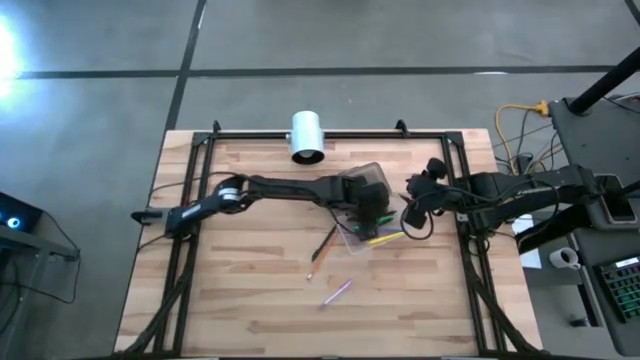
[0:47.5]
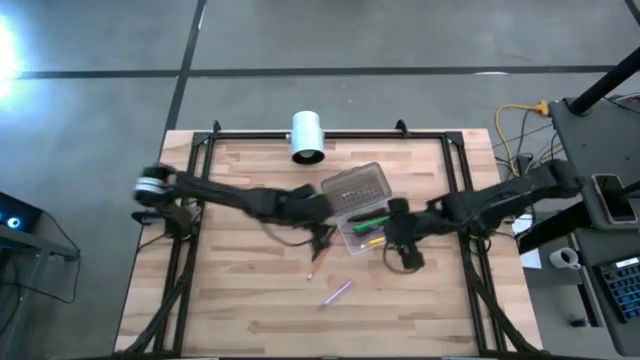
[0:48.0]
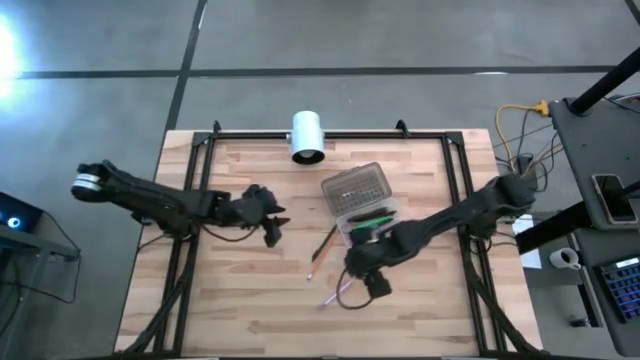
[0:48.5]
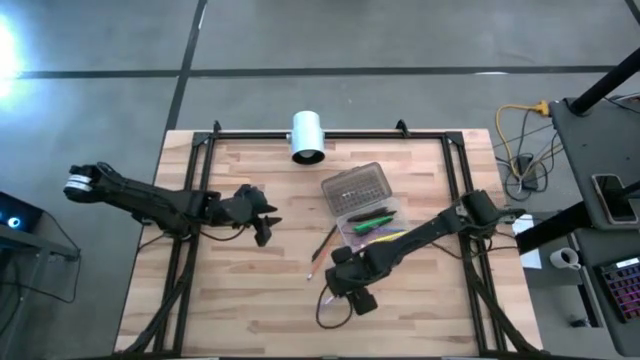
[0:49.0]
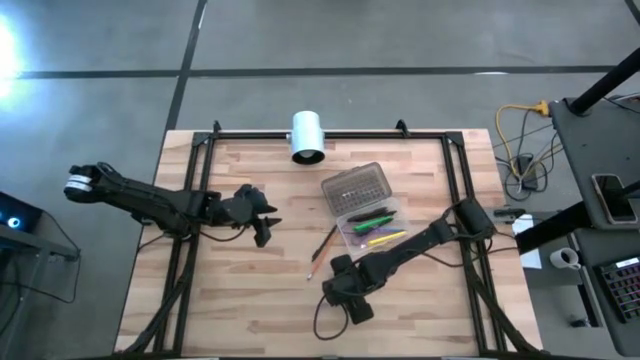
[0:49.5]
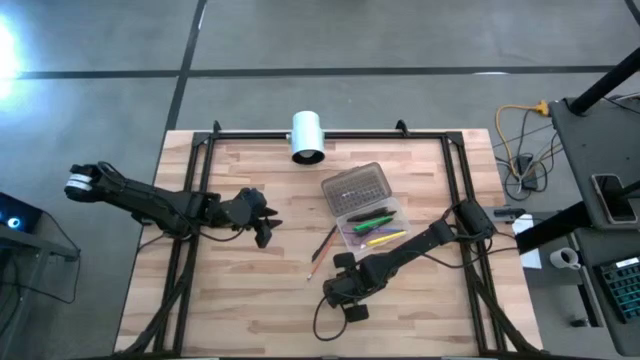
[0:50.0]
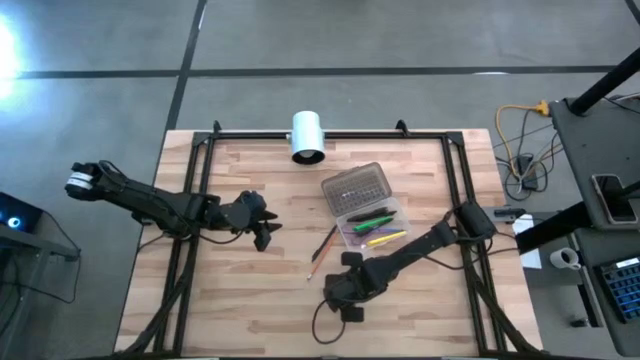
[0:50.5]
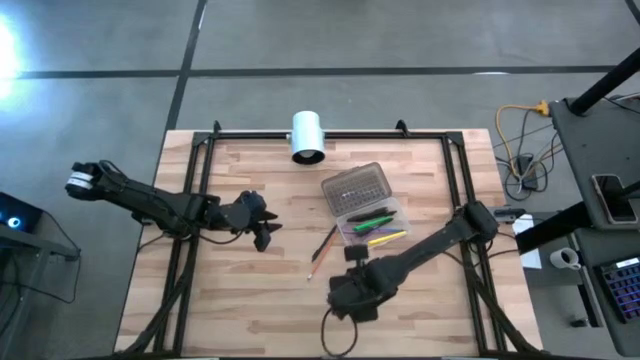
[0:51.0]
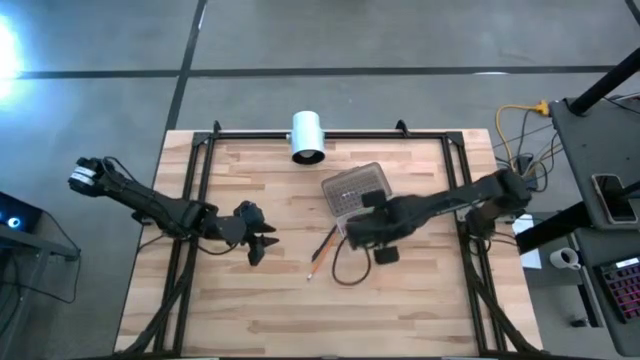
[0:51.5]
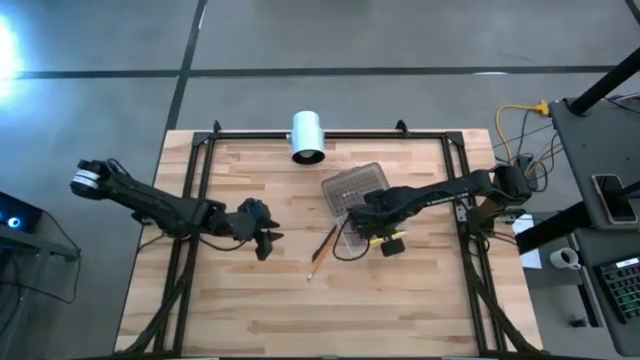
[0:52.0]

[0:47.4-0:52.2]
Task: Pick & place school supplies into a supply box
Put the purple pen into the supply box

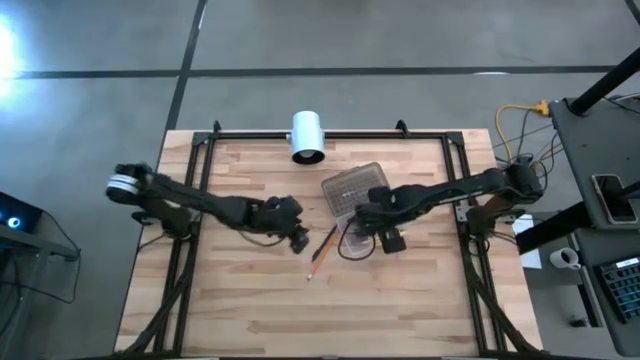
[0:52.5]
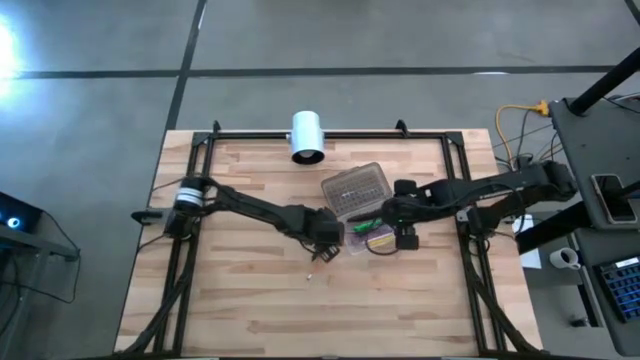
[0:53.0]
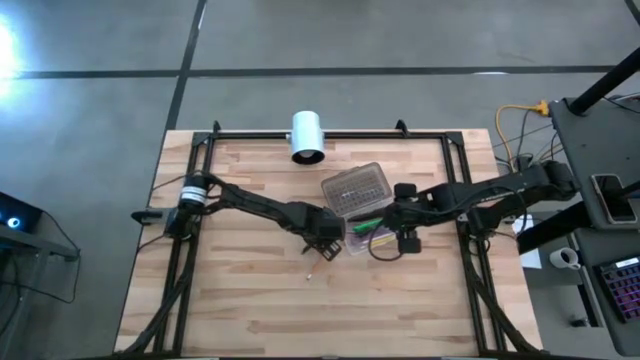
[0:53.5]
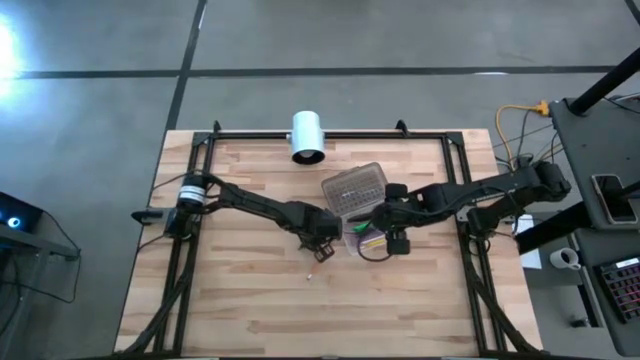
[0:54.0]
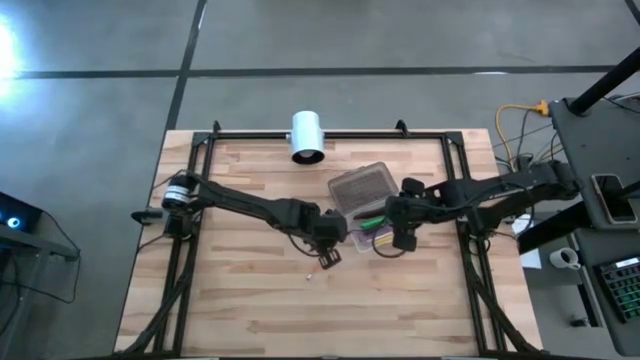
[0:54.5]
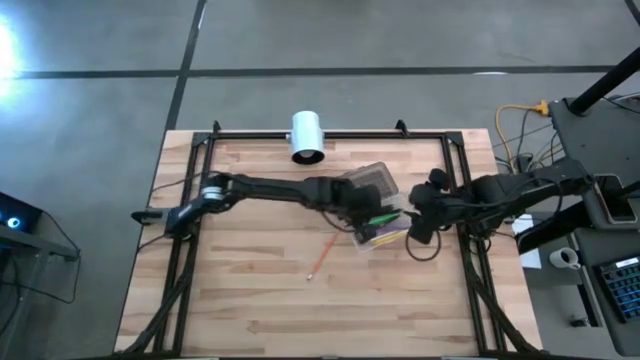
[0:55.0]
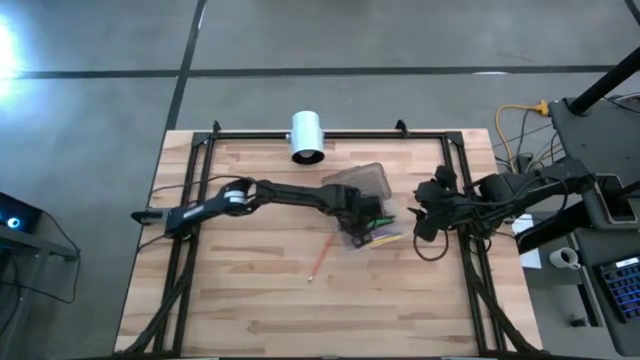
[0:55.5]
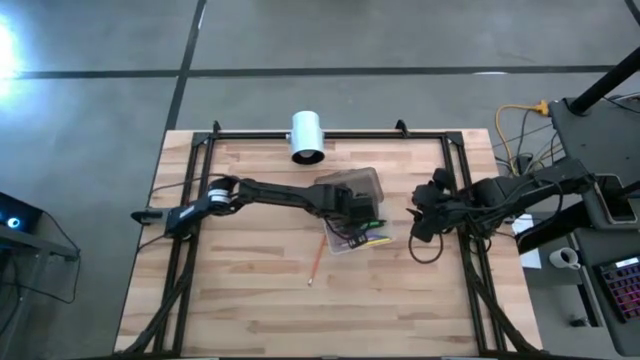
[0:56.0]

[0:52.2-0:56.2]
Put the black pen into the supply box

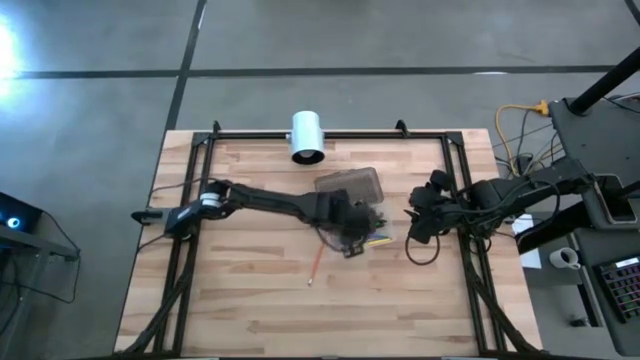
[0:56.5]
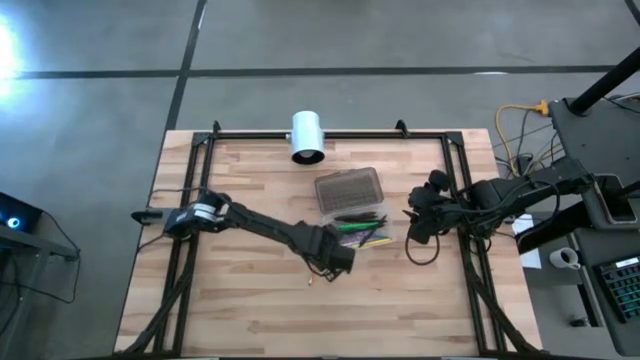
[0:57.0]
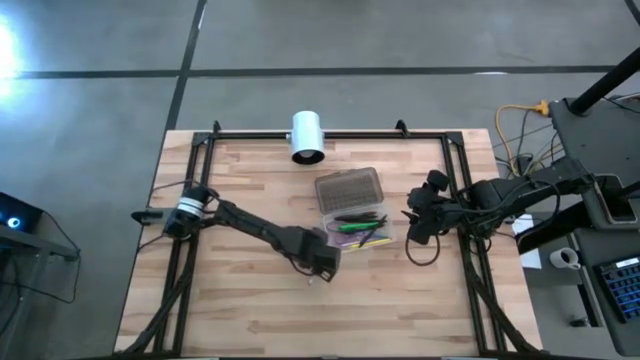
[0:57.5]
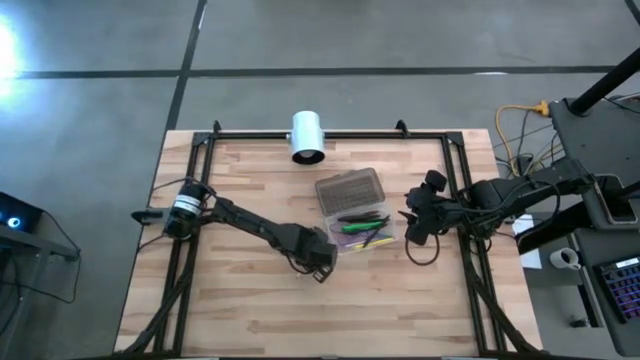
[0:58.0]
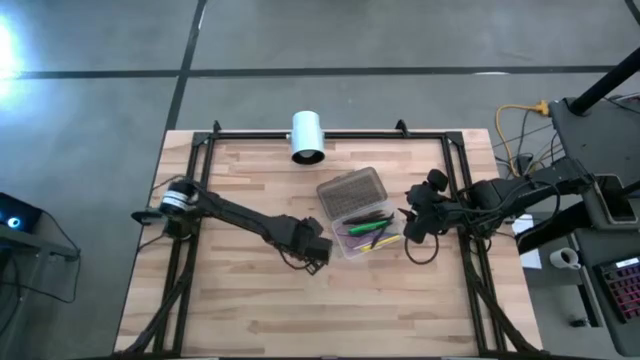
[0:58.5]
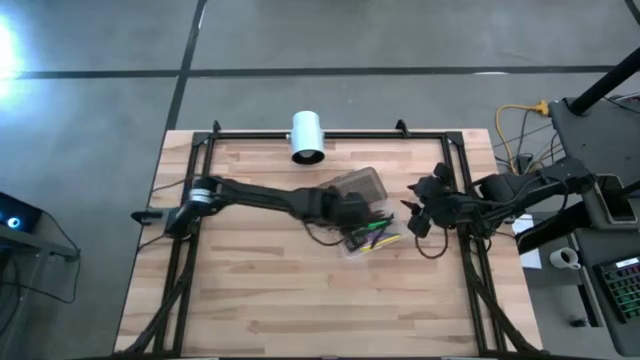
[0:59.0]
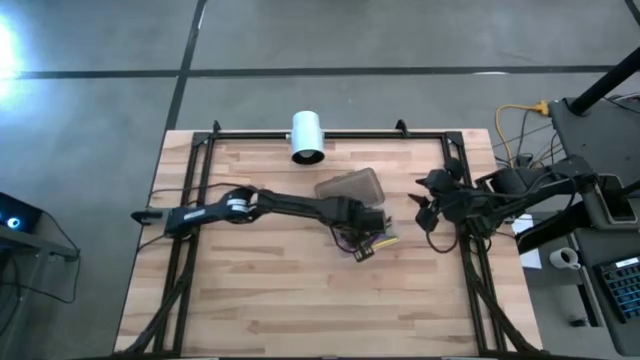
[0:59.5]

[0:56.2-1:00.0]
Put the yellow pencil into the supply box

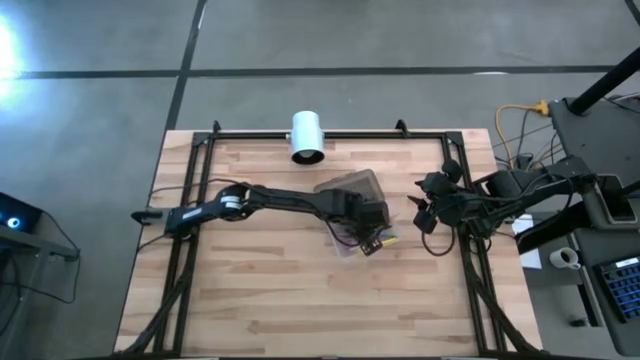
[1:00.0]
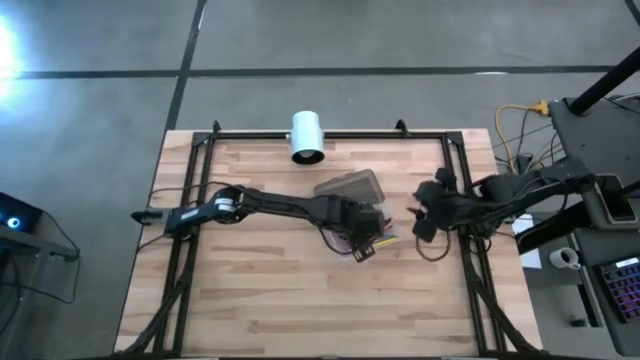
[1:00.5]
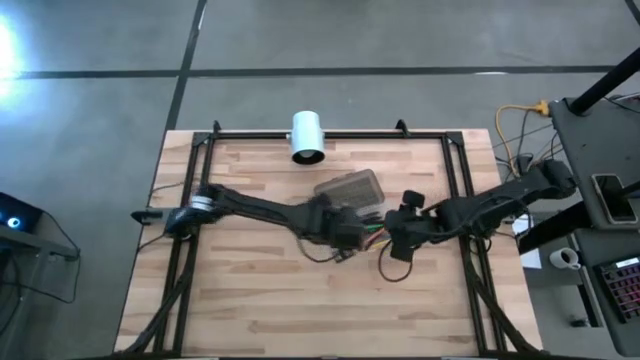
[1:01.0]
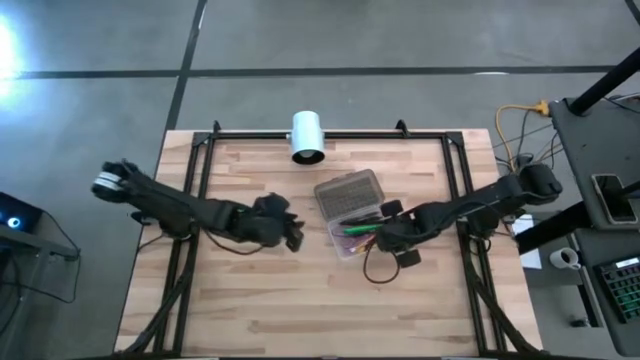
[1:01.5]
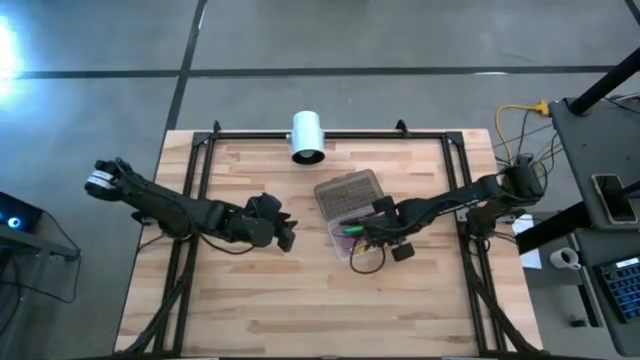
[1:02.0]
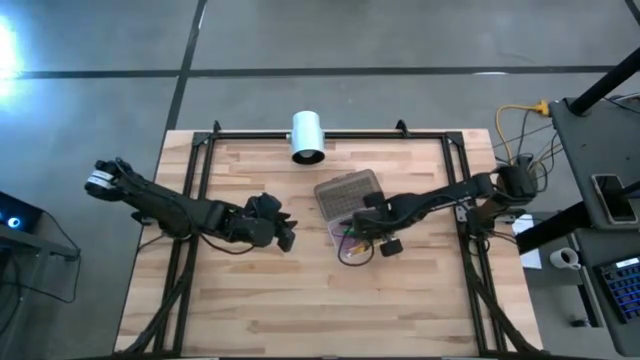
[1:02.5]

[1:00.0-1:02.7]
Adjust the yellow pencil in the supply box

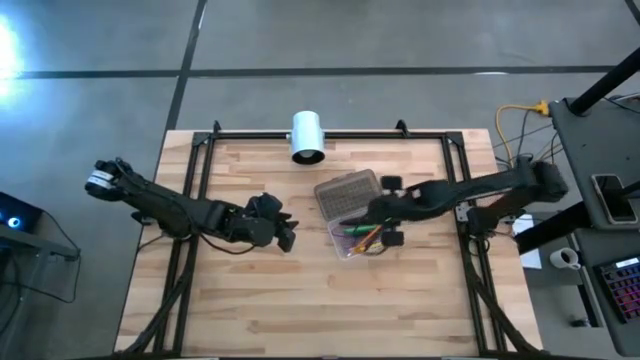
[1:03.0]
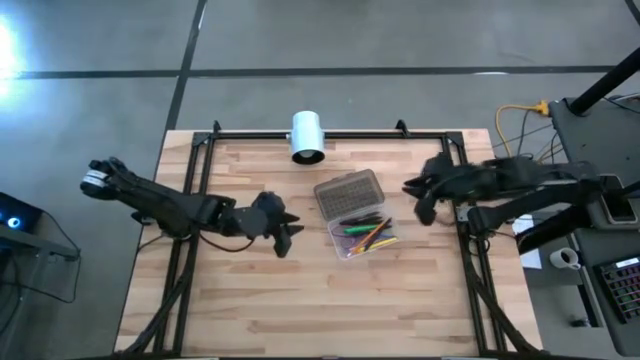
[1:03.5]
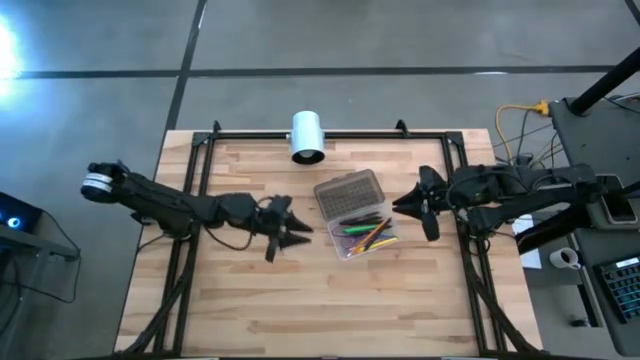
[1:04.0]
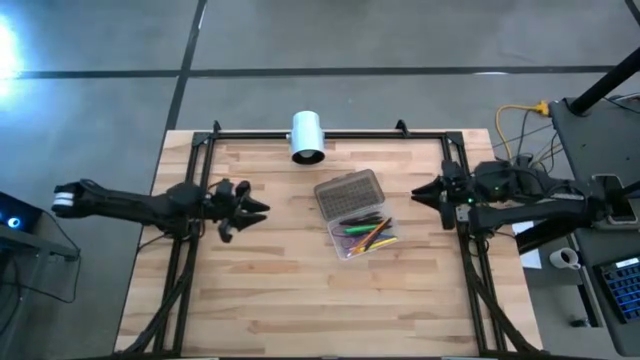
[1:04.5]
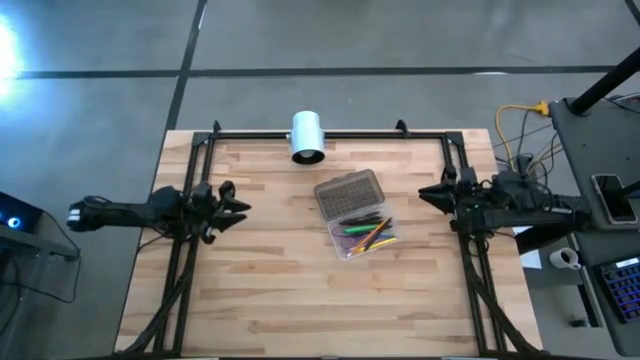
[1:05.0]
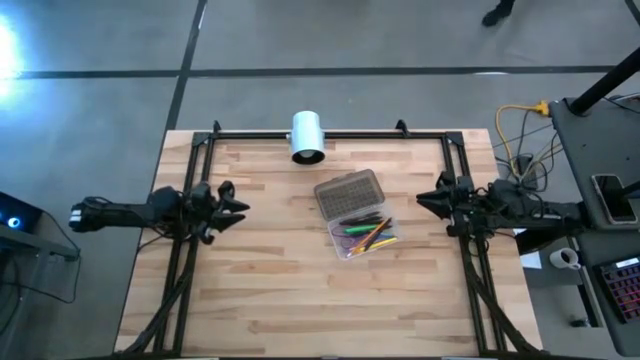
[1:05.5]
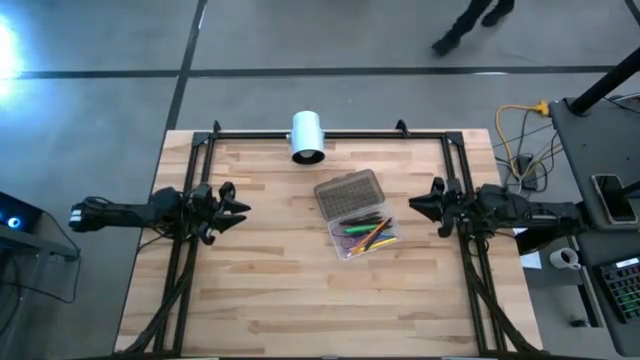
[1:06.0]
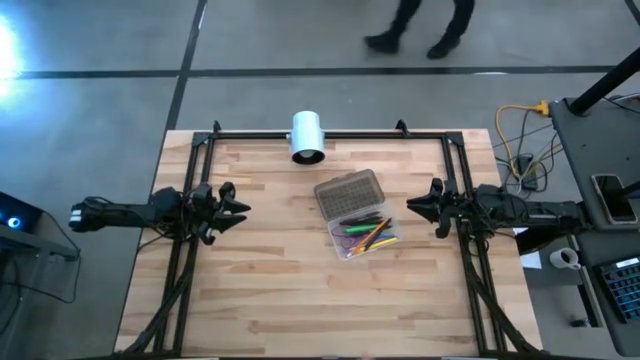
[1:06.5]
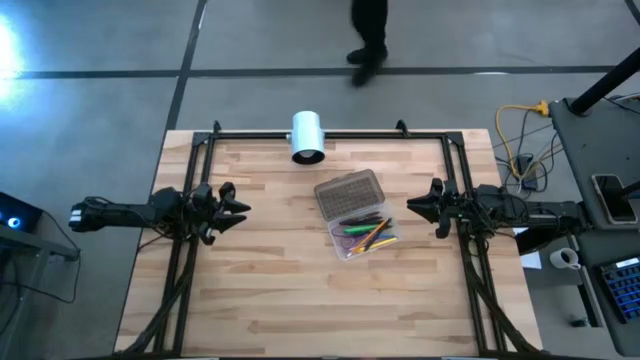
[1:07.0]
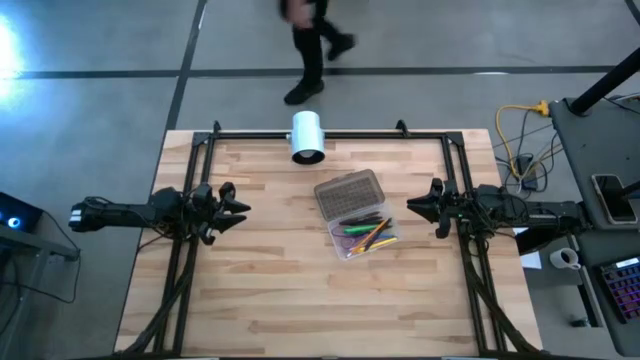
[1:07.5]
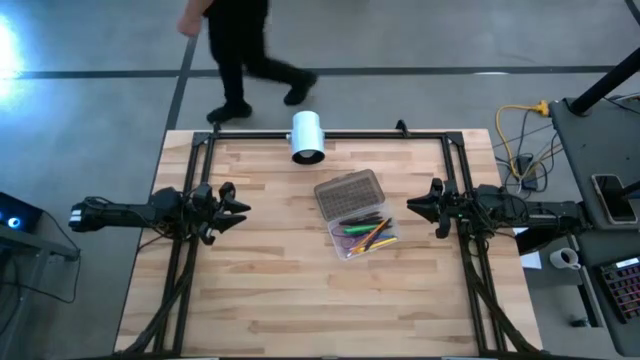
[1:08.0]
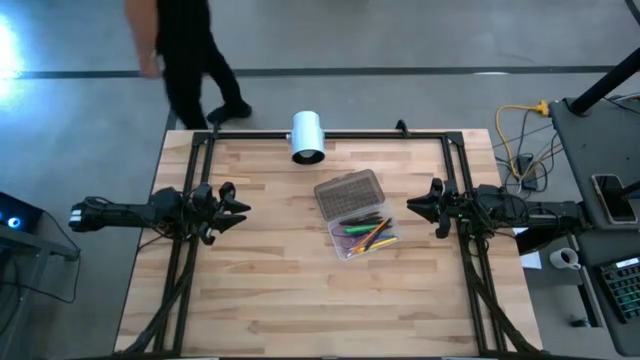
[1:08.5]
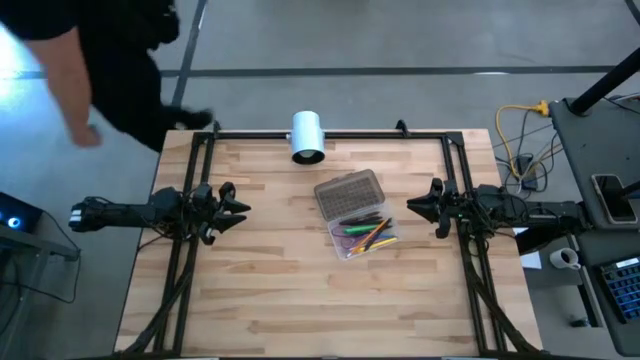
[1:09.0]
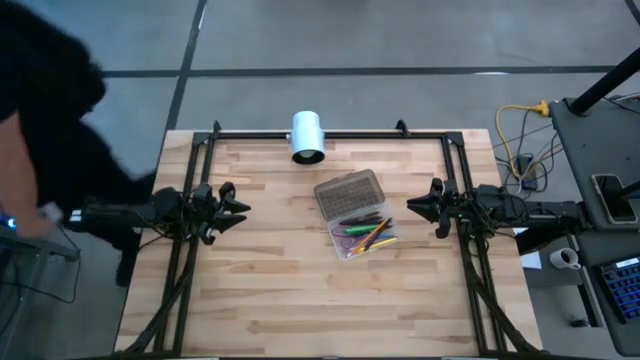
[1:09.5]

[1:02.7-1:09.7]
Return to Home Position
